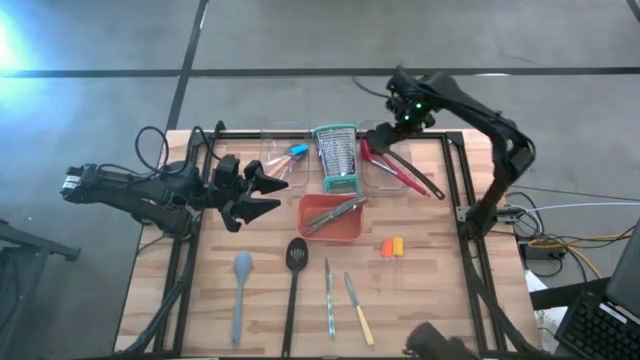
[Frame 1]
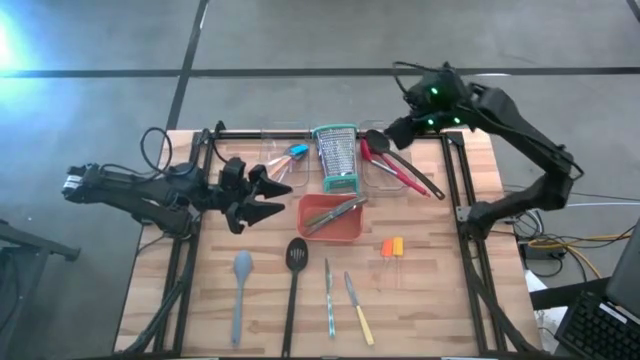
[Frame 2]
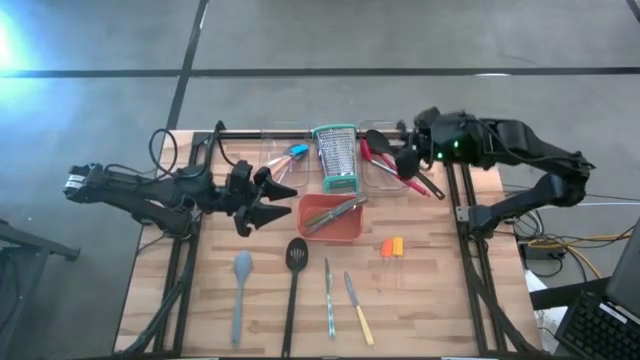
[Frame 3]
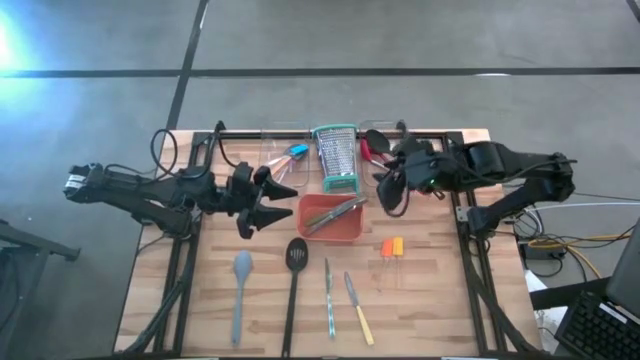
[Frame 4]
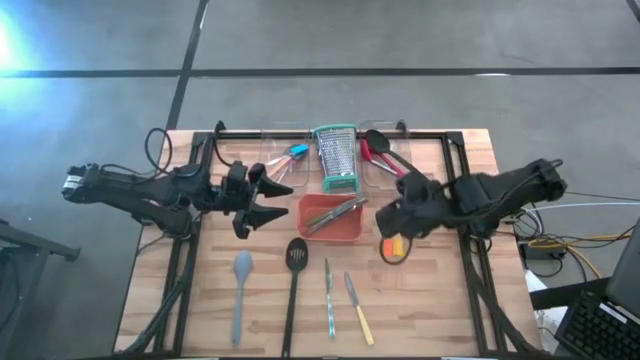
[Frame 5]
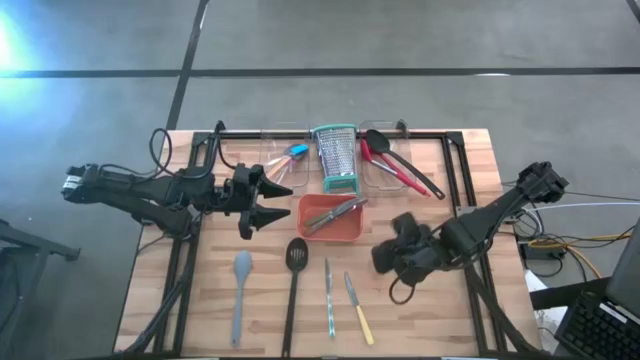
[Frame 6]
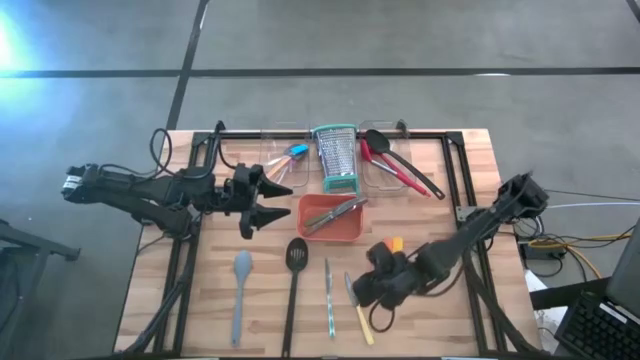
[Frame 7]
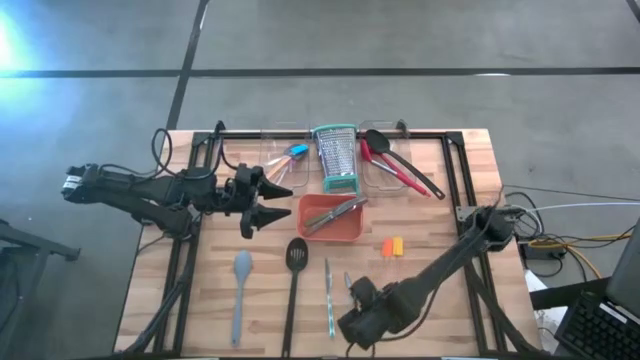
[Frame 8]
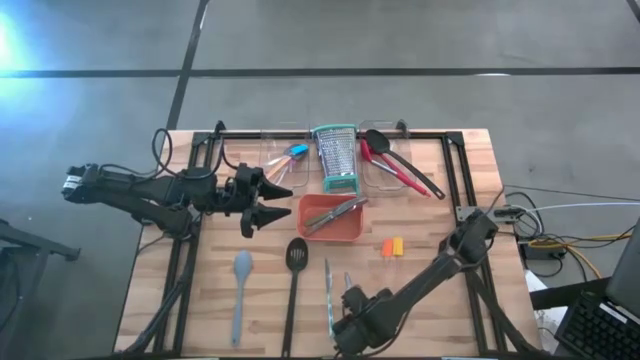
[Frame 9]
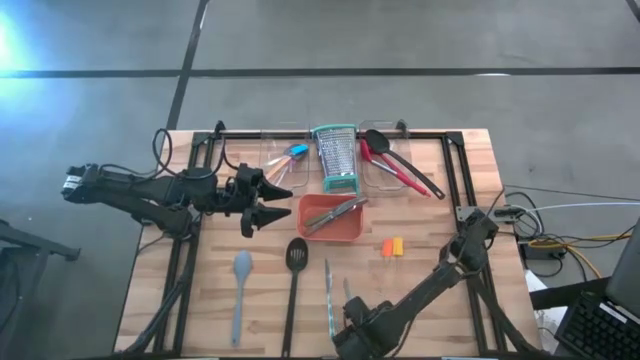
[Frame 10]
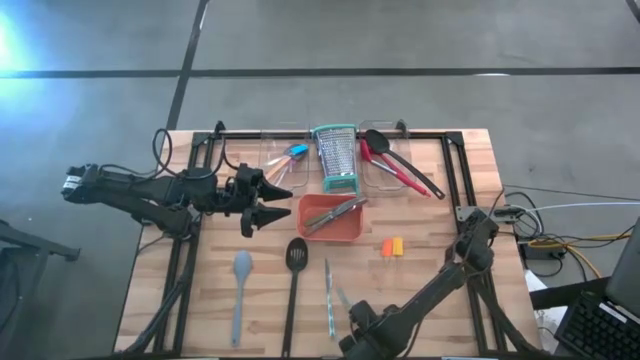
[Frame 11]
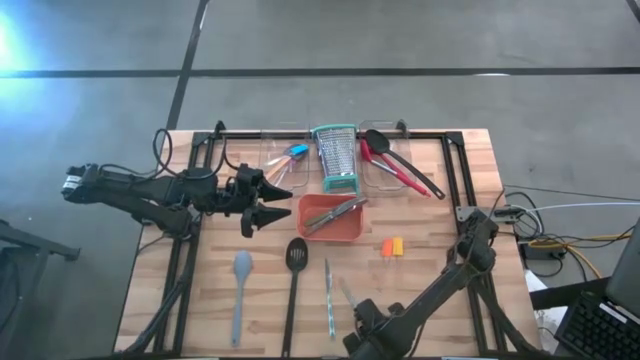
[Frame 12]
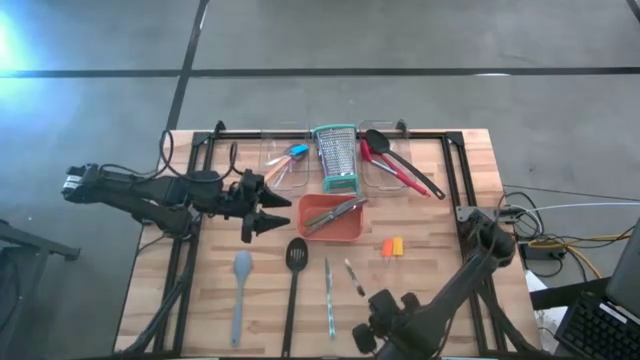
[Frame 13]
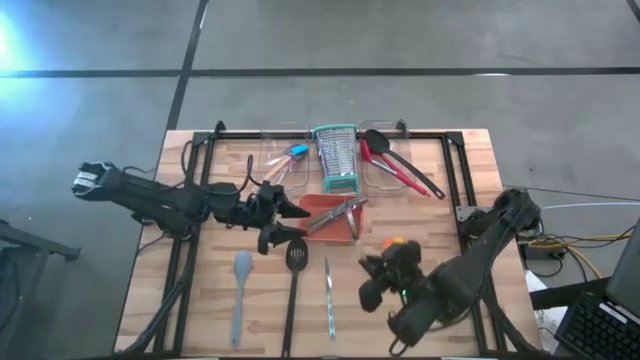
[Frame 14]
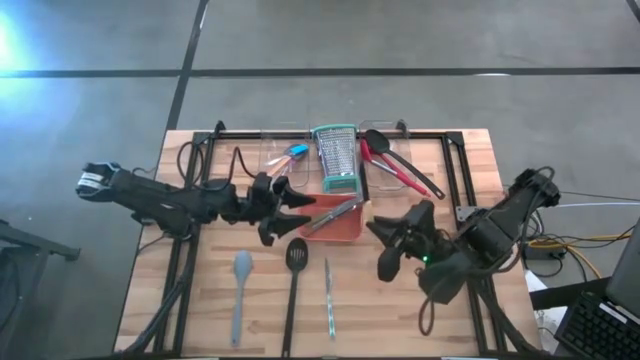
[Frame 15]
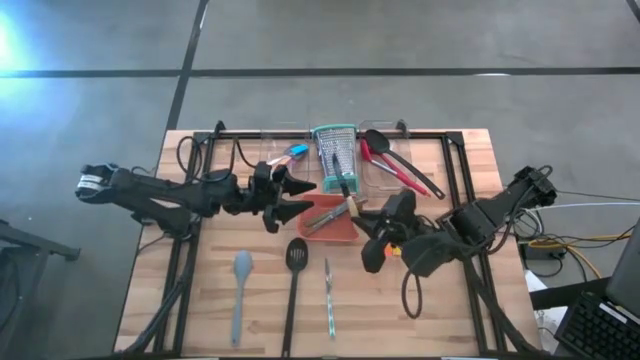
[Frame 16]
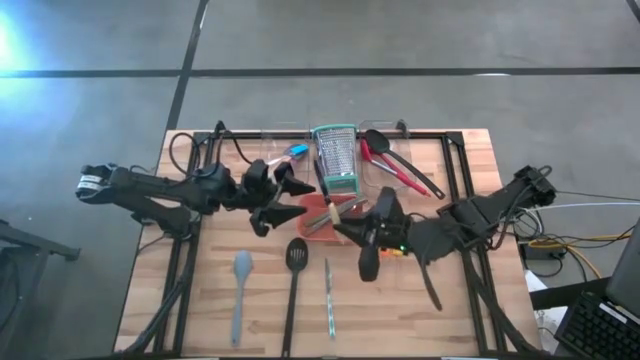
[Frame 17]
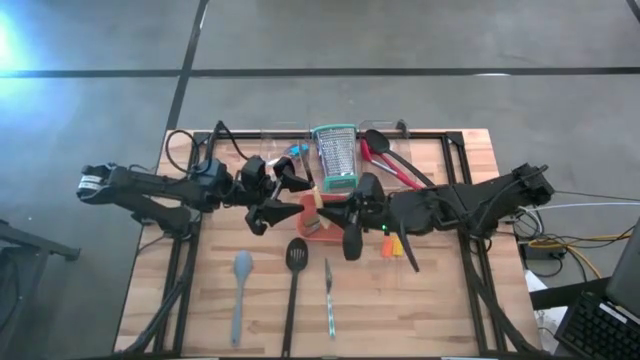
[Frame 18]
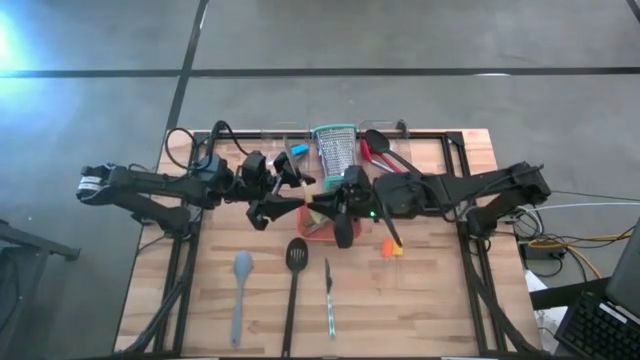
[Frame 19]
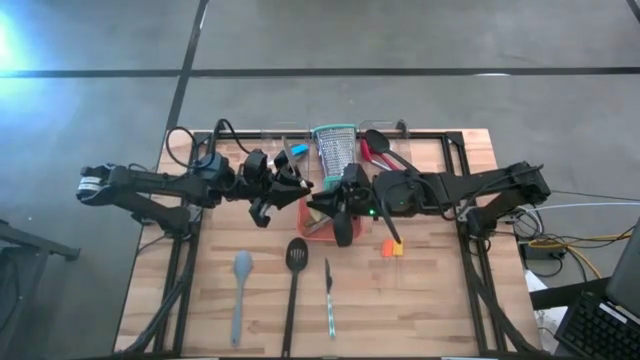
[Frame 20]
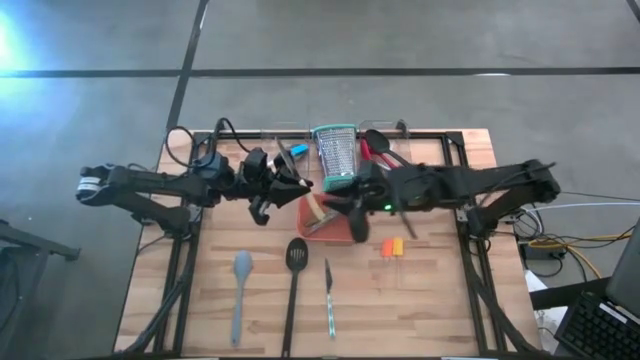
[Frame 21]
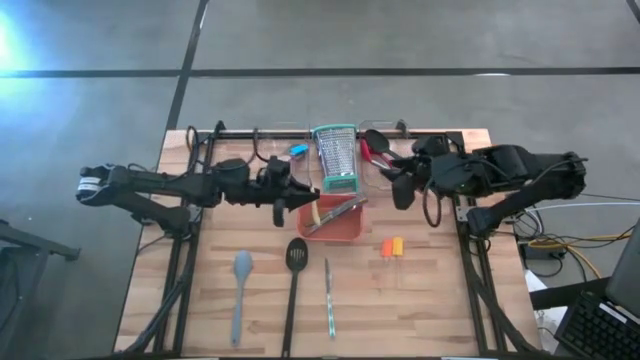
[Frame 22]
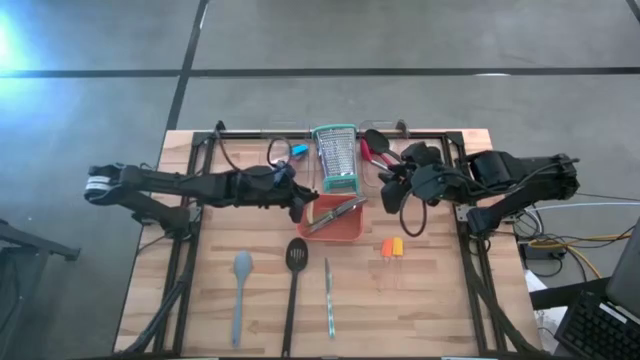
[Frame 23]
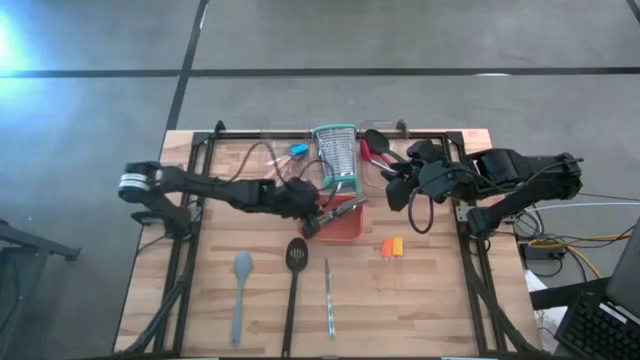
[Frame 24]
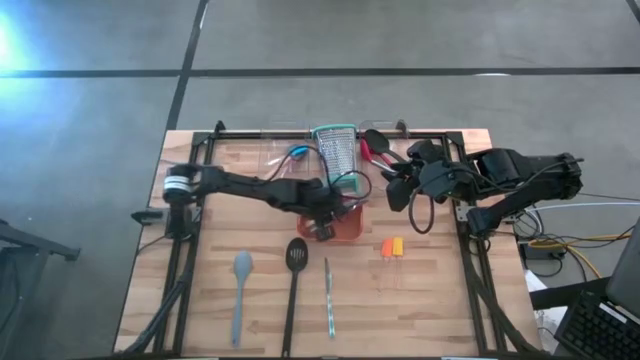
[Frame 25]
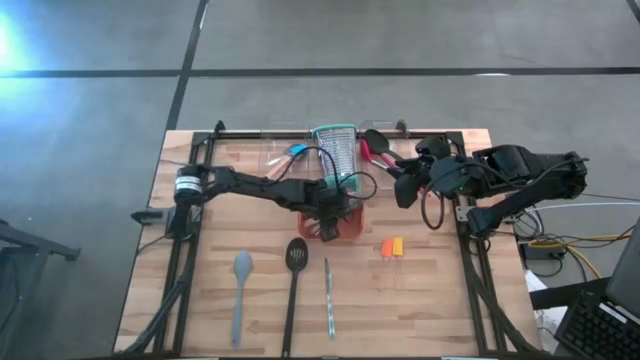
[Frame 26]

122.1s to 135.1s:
Task: Pick & Place Kitchen Items
Put the yellow knife into the orange bin

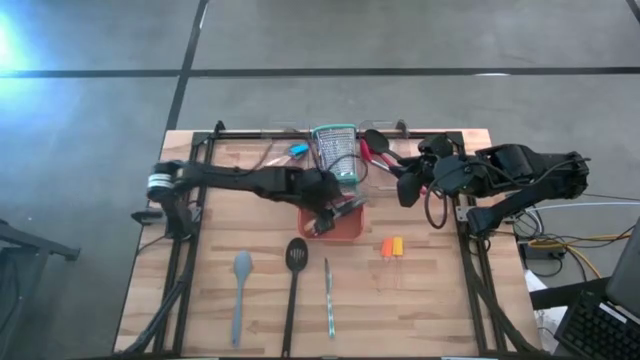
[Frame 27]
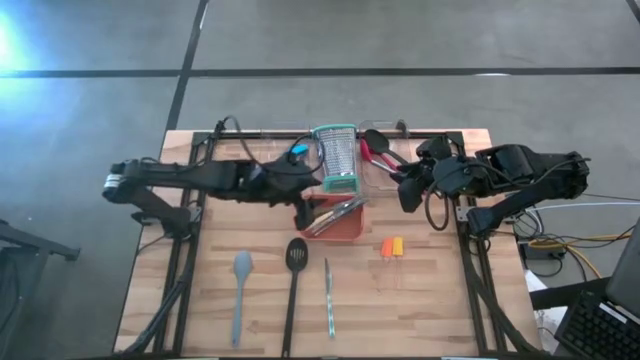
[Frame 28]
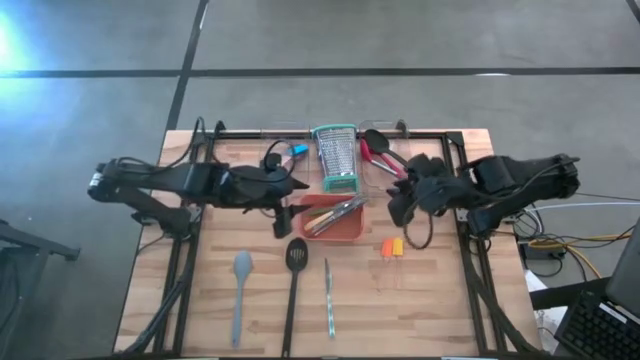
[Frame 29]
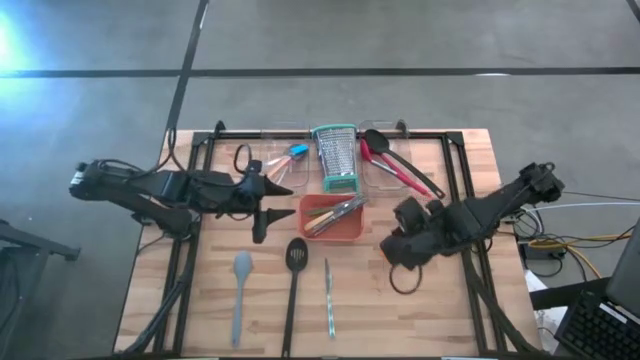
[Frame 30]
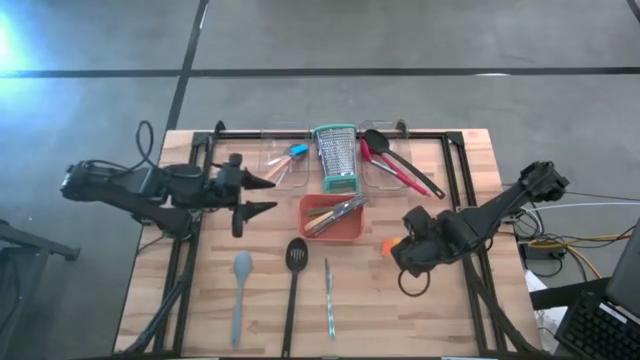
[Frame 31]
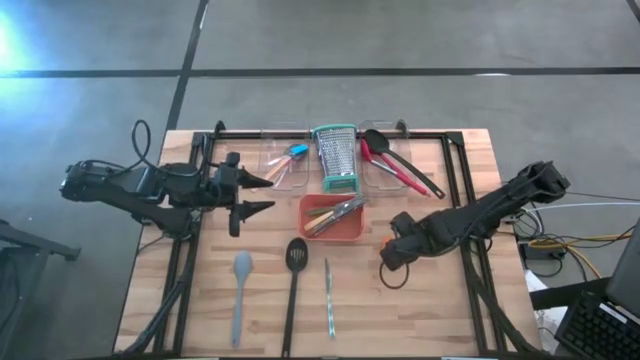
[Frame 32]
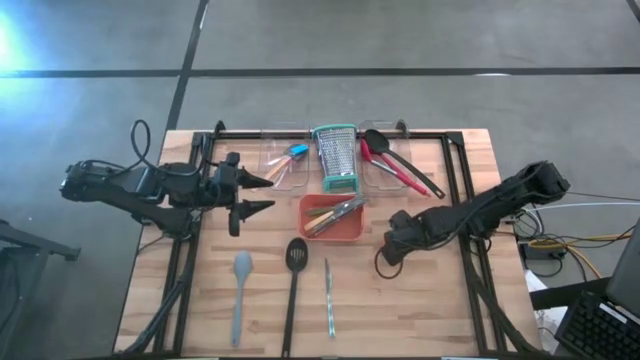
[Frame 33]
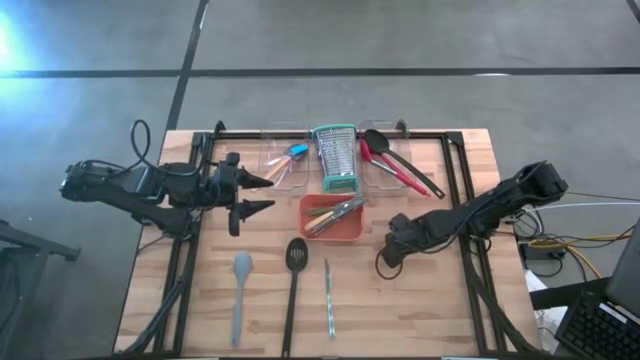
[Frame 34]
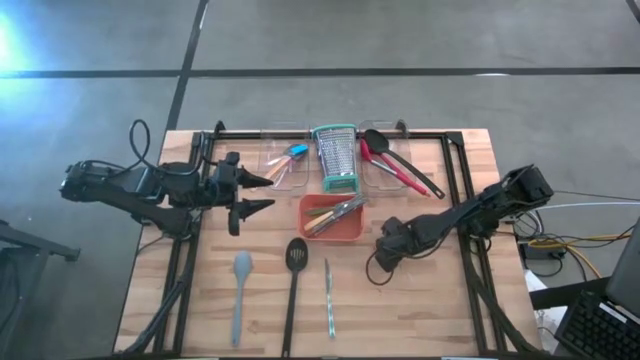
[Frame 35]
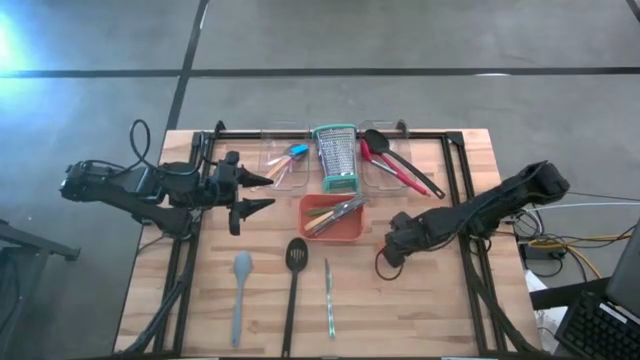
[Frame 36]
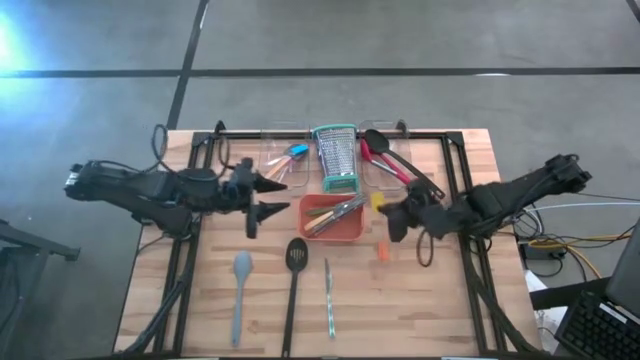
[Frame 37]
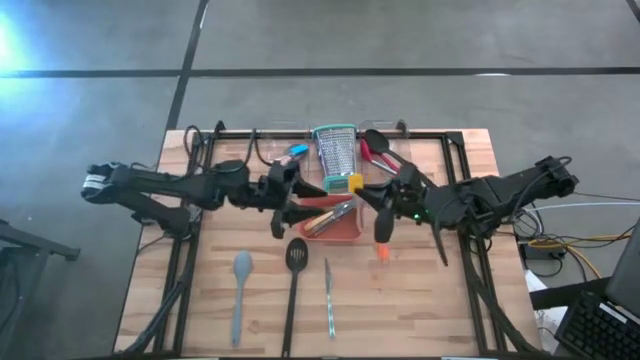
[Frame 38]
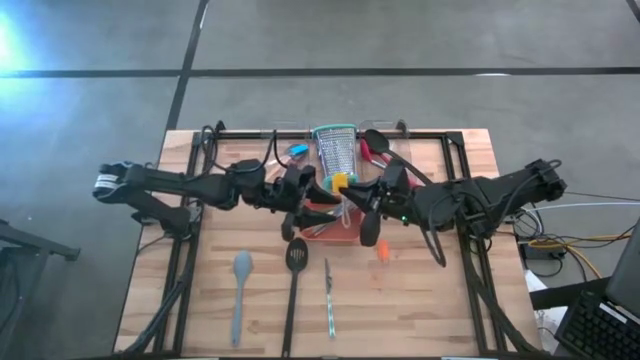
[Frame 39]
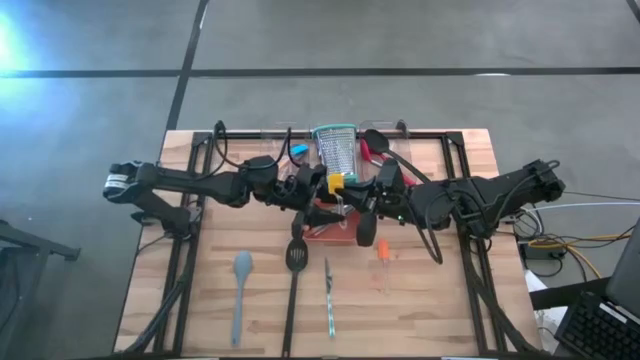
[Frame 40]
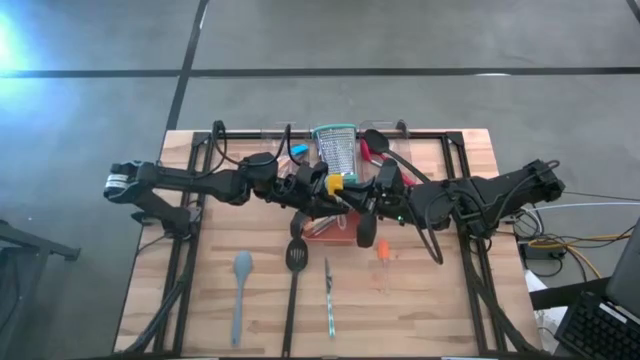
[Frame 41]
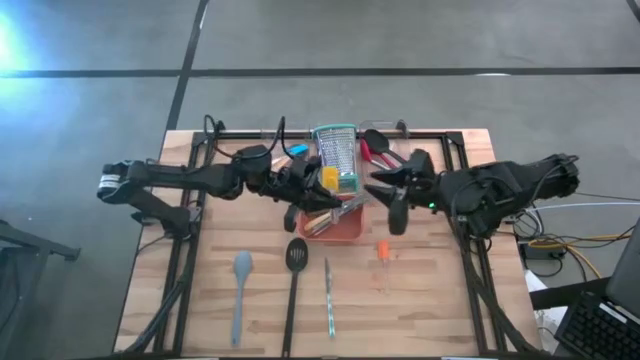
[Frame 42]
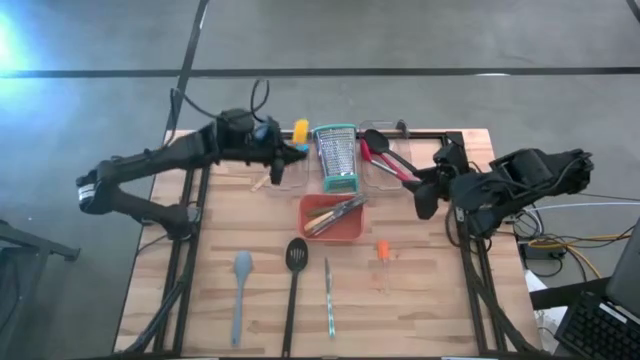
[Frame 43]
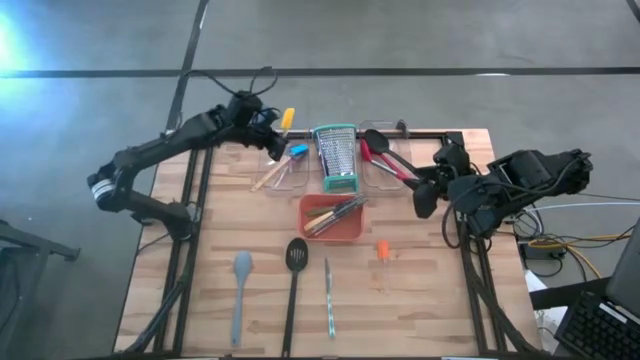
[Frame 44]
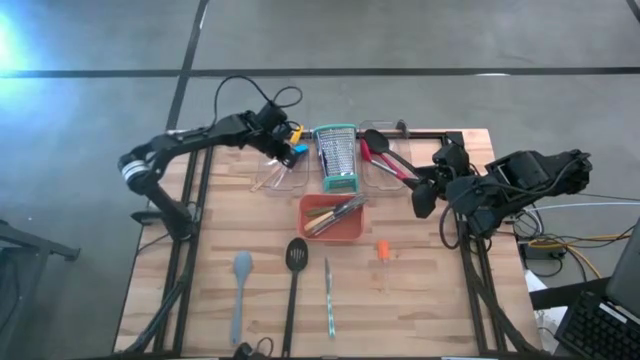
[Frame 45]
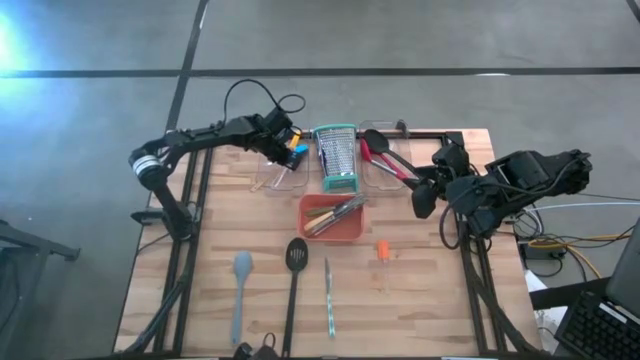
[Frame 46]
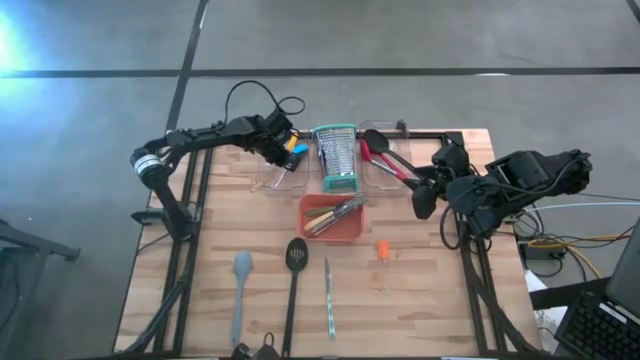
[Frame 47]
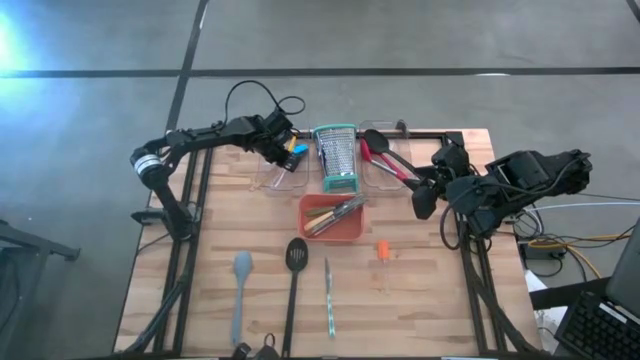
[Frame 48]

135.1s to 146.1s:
Put the yellow spatula into the left transparent bin
